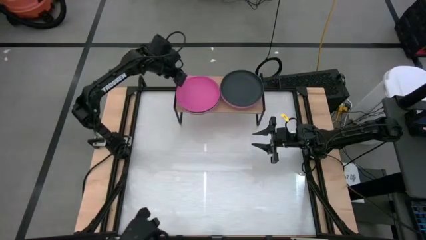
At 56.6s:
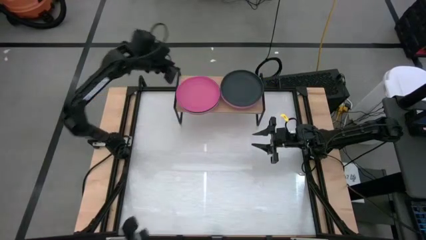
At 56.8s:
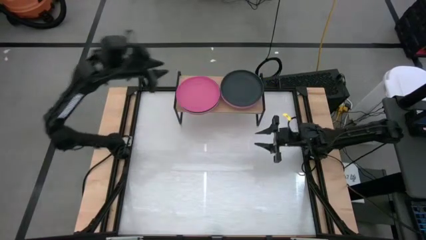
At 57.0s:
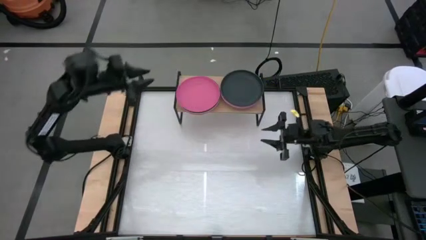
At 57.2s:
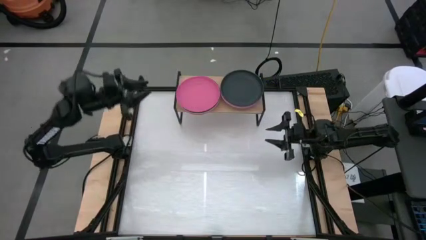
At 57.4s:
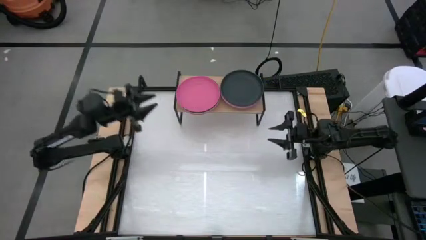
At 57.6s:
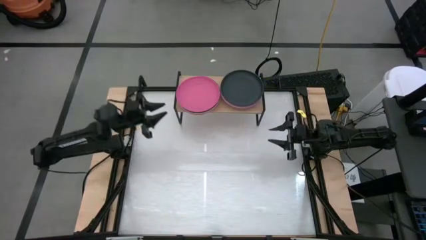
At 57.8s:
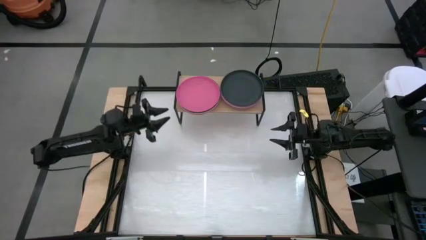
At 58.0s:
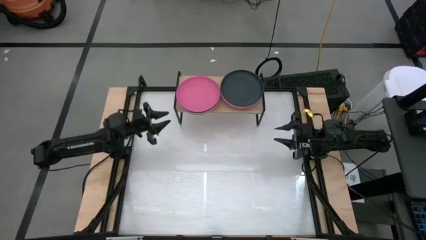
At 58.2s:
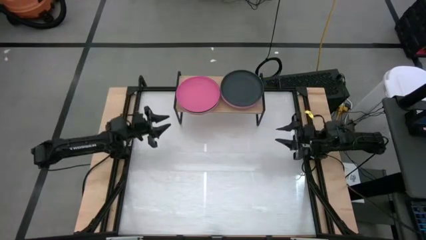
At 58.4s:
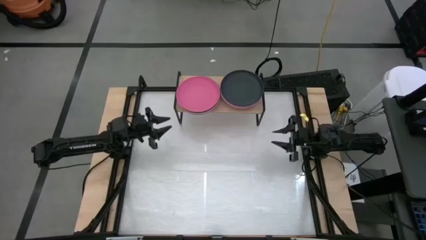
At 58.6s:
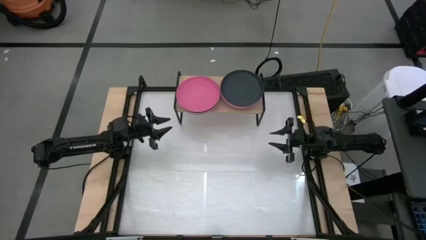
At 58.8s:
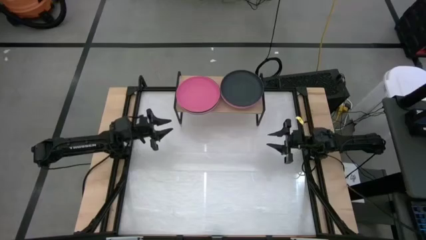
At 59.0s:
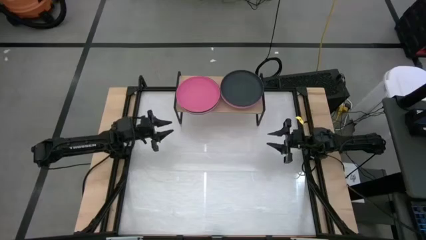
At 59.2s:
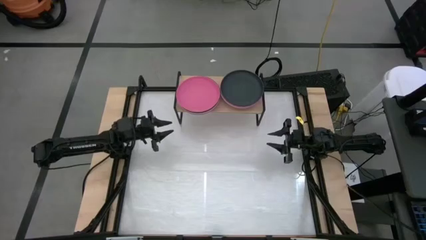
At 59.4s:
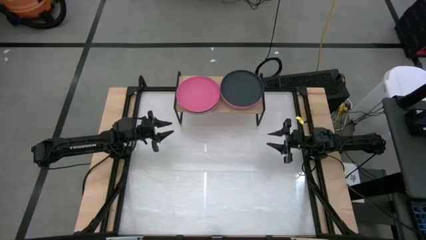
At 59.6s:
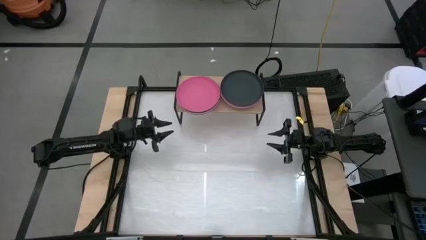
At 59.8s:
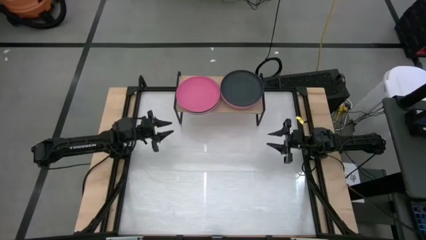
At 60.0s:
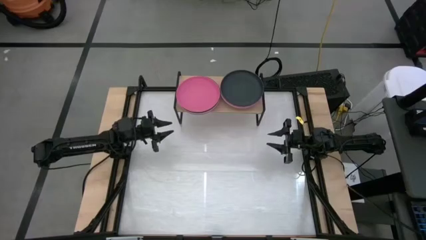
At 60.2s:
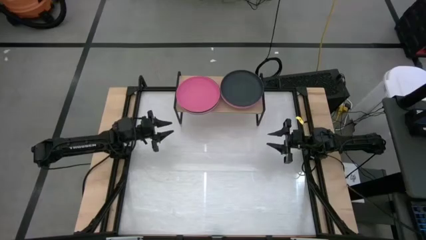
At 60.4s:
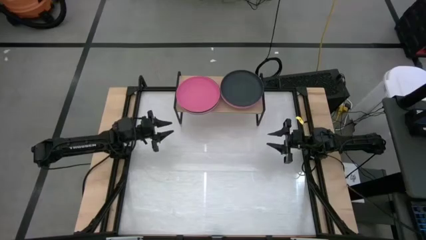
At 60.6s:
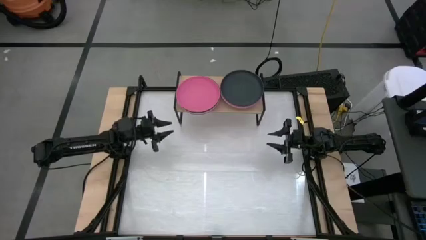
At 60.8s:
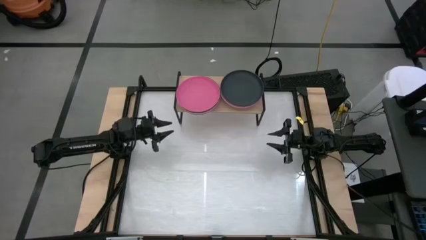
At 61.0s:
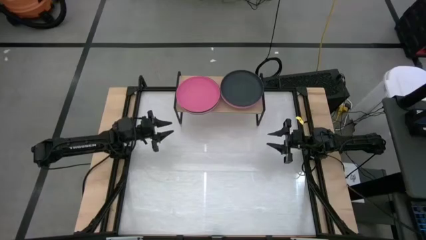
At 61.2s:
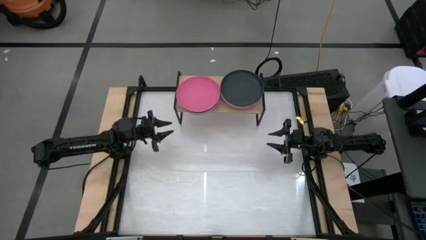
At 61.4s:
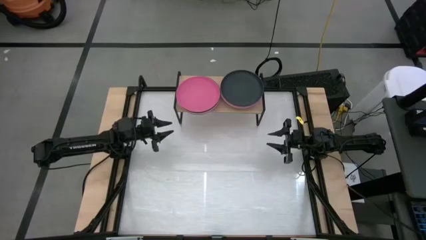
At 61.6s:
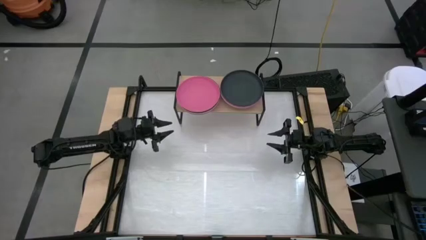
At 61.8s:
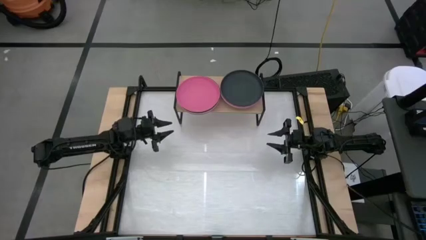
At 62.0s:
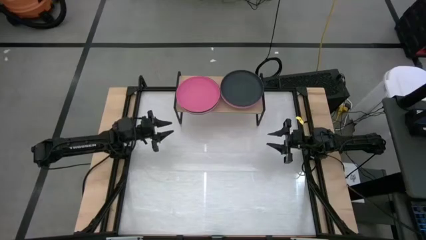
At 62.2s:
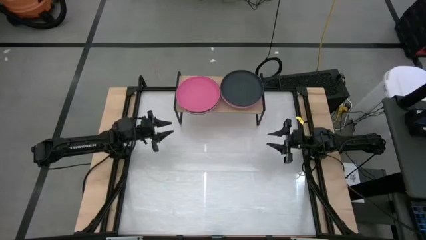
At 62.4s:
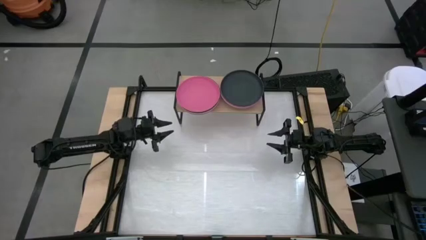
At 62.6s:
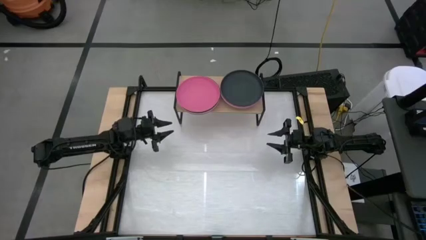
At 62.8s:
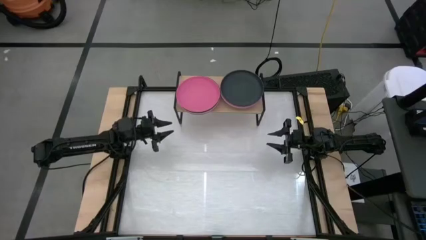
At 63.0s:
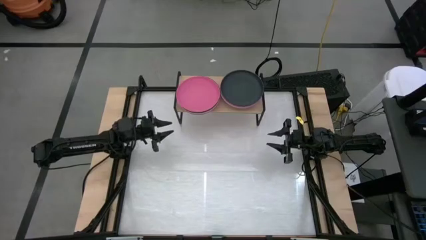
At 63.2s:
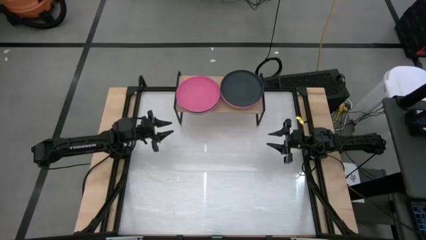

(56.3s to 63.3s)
Task: Place and stack plates onto a shelf
Return to Home Position

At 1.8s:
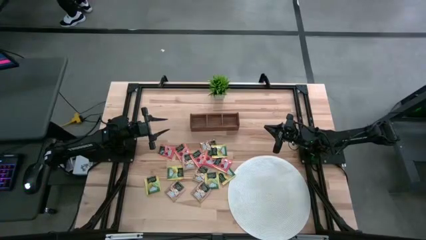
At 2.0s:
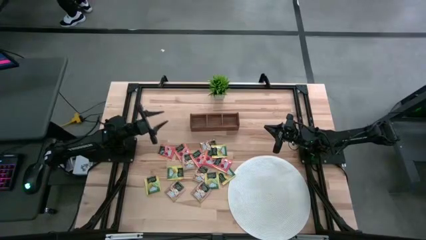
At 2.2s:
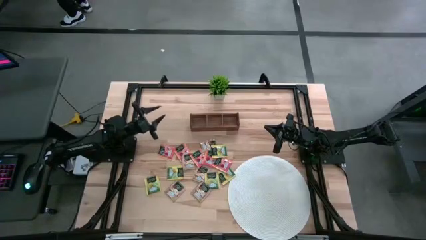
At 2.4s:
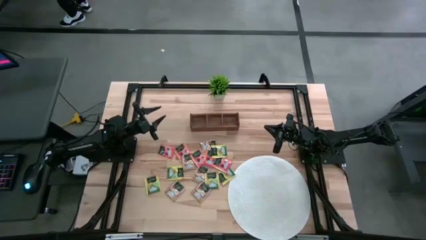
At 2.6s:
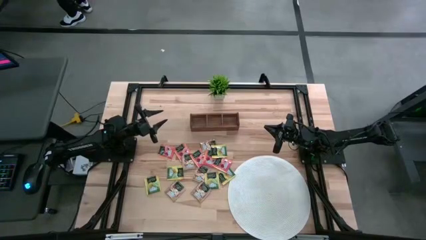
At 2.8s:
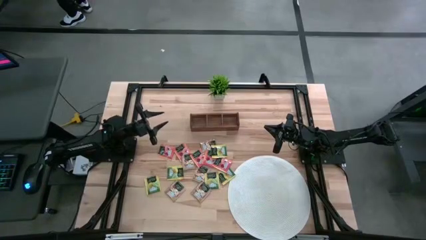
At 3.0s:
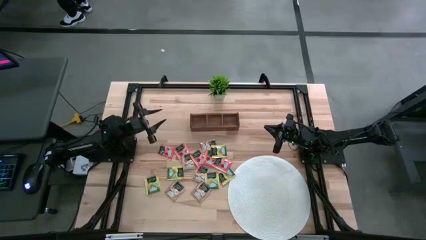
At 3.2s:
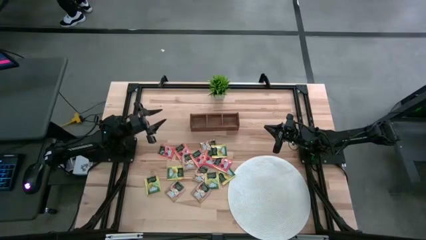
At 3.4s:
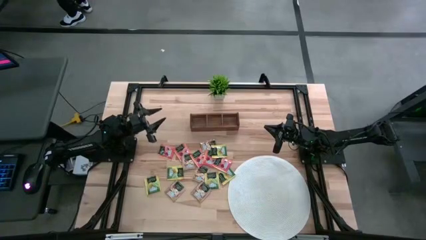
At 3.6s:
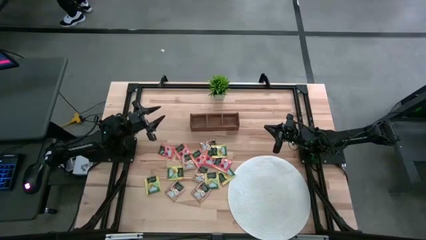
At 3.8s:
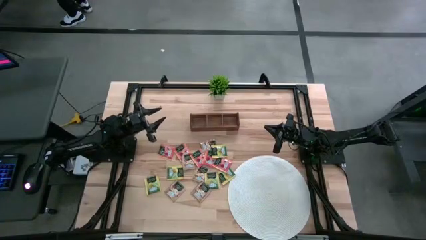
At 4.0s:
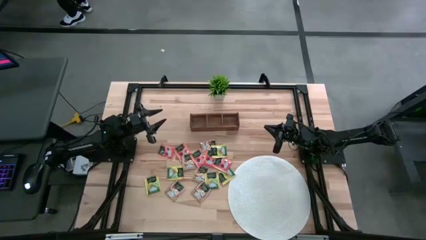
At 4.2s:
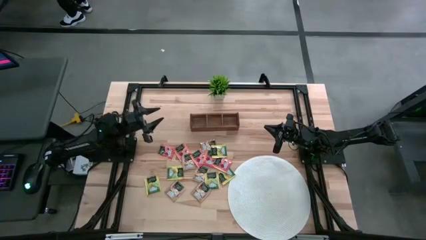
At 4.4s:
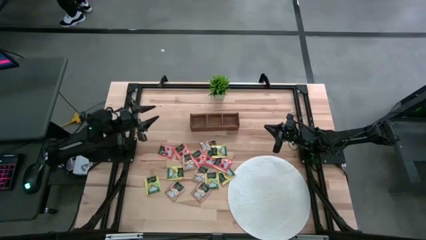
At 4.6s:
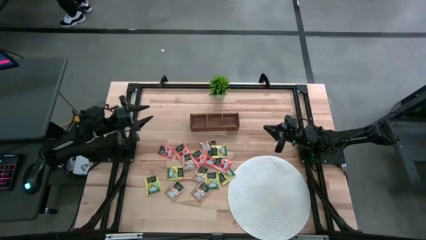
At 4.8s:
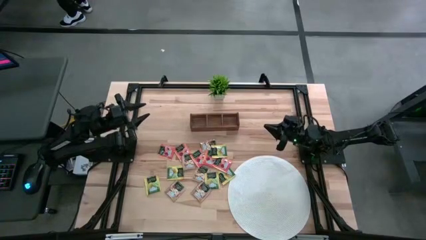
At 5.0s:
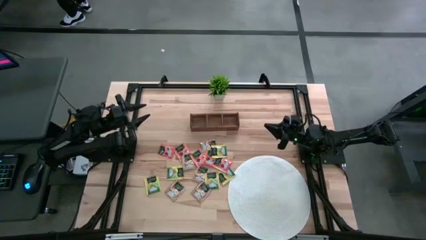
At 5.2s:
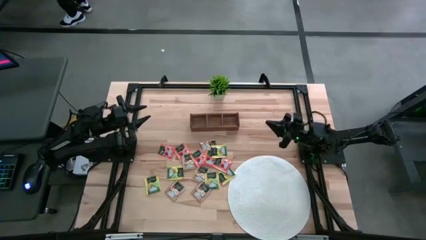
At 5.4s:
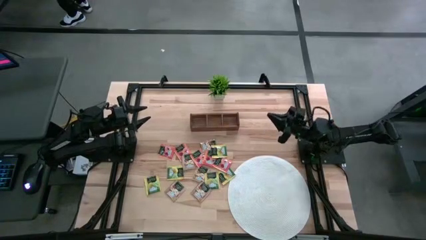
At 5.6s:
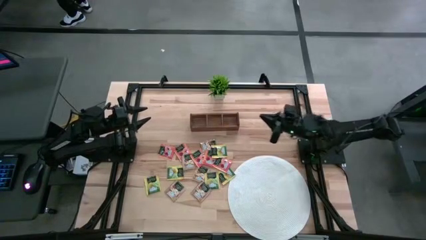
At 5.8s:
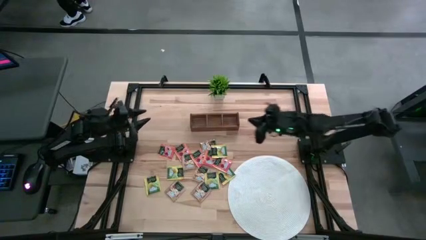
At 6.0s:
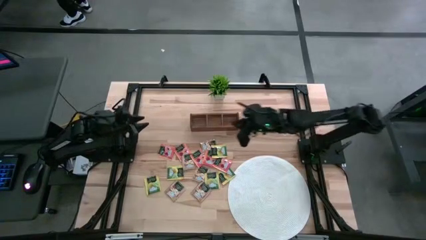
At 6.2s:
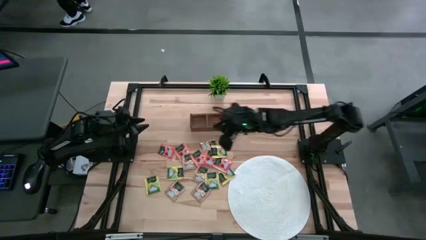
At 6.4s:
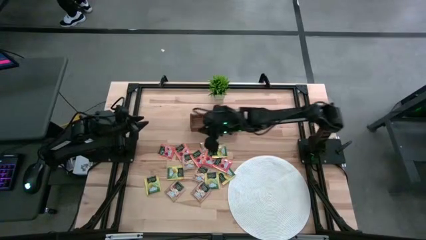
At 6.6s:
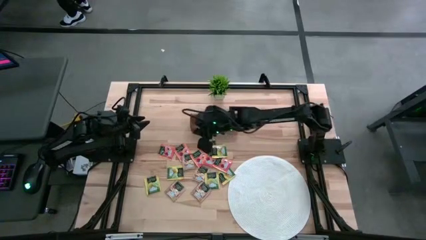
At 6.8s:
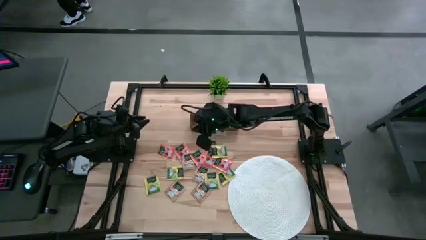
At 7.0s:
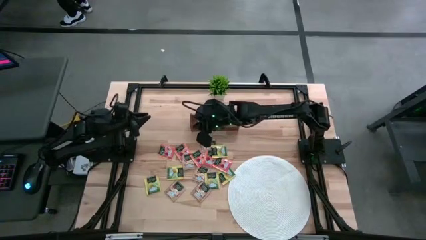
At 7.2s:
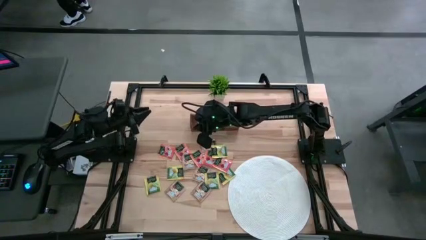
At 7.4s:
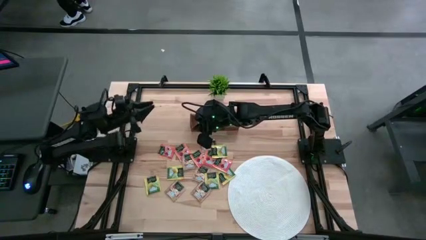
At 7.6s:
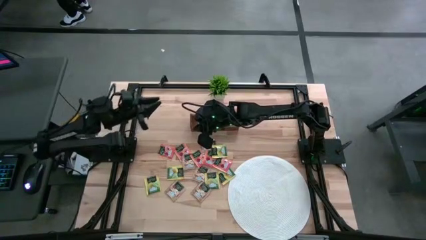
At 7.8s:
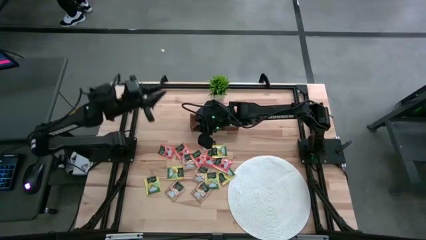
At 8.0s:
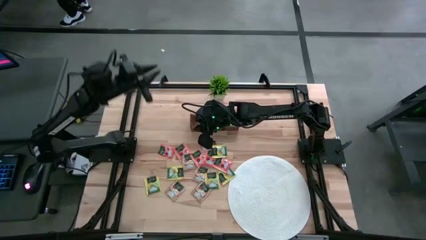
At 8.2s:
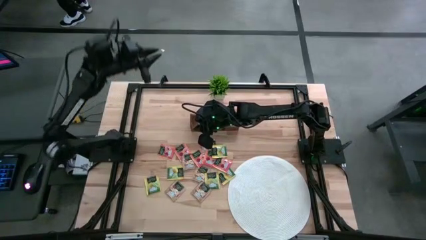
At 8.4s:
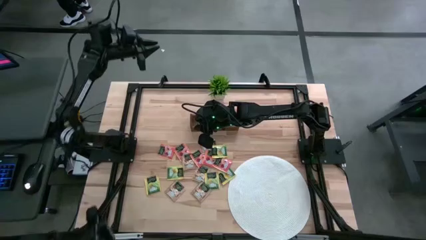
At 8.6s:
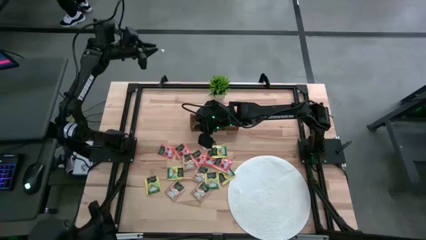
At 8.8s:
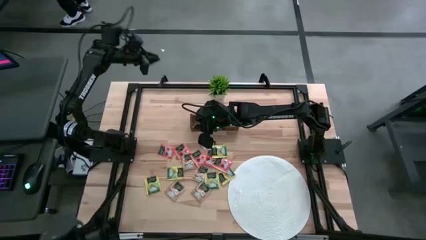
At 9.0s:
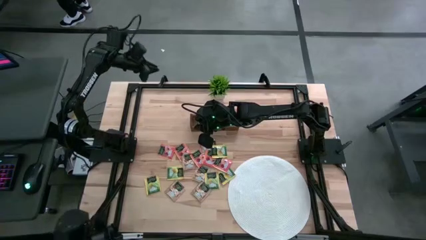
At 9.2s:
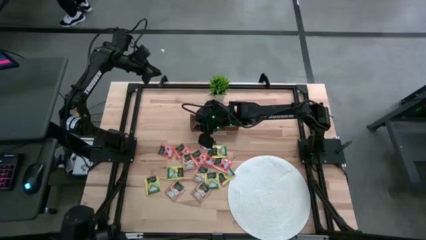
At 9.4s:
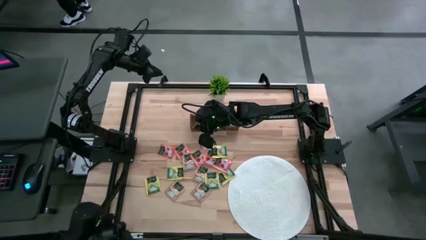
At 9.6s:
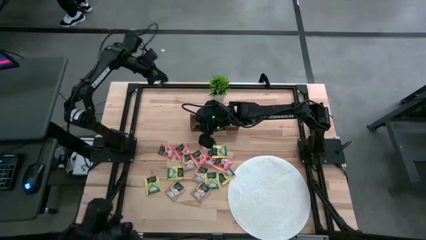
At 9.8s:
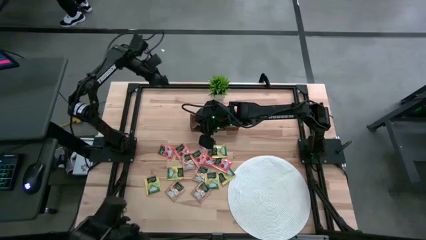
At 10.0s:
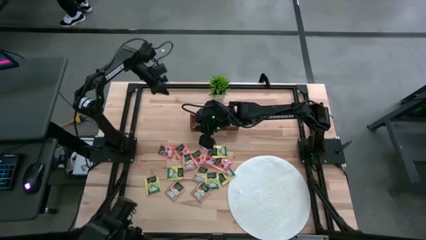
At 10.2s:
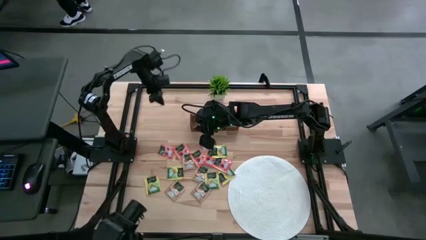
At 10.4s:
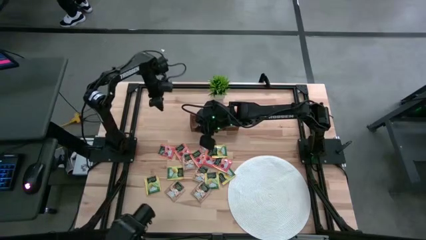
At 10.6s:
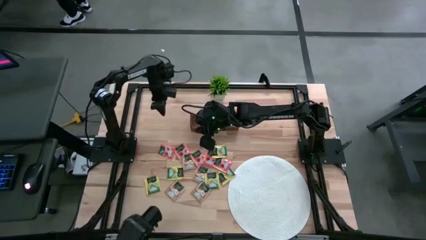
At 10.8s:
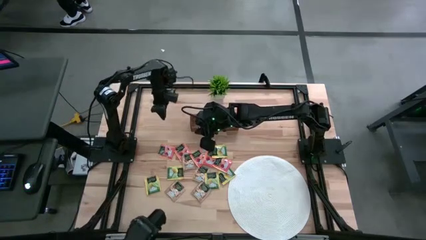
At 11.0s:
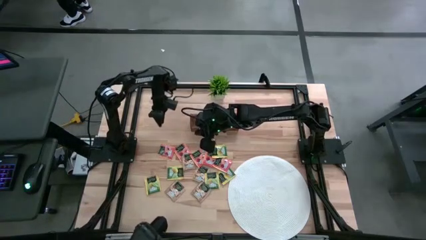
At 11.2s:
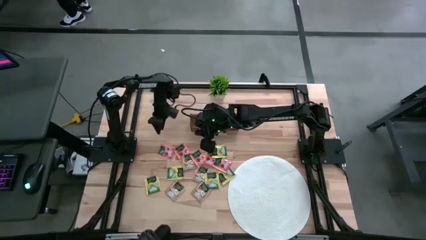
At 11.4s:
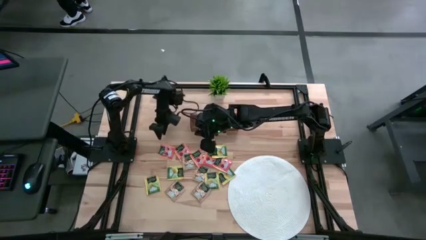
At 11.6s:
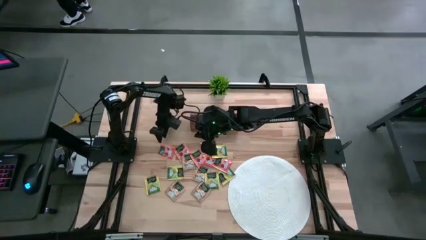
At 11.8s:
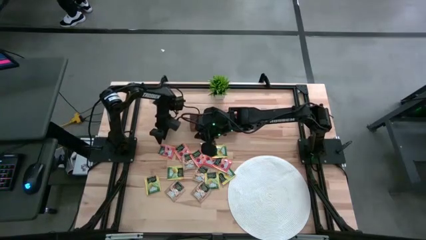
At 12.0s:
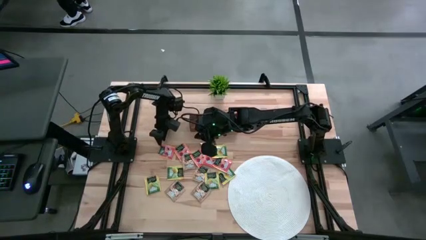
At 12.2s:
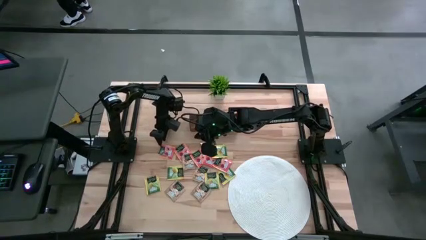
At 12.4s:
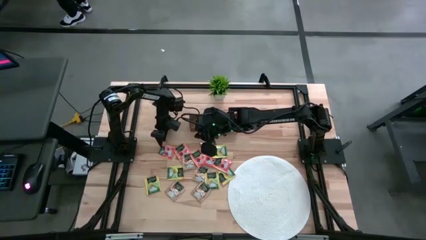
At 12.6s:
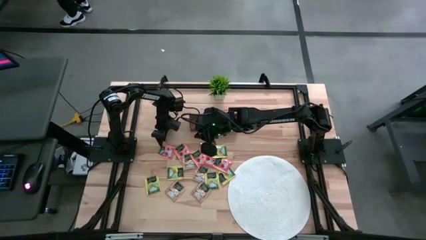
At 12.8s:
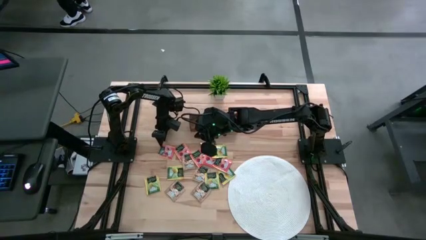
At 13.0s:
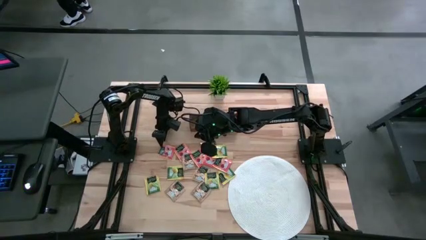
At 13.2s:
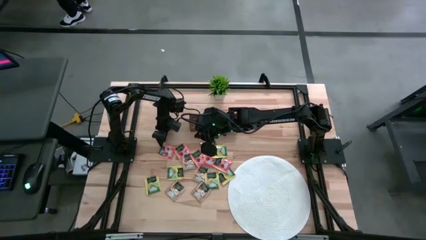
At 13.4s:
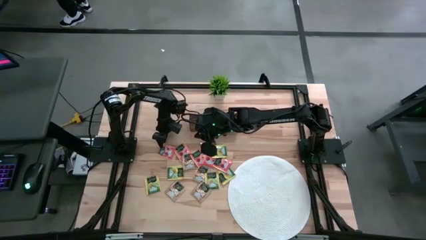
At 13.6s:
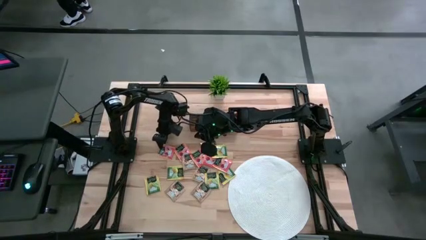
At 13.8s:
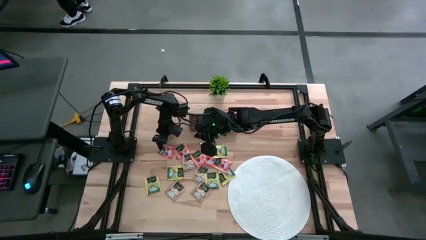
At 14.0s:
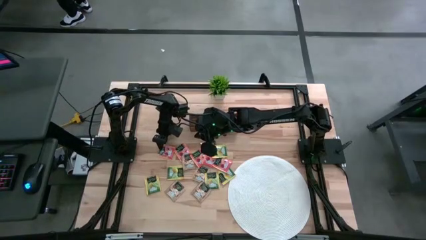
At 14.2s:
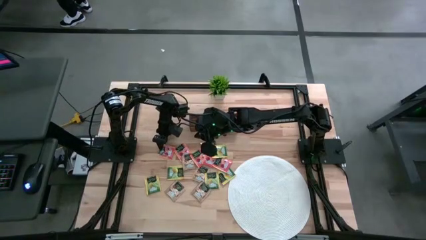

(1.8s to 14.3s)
Task: Pick & Place Tea
Put the orange tea bag into the left section of the wooden organizer
